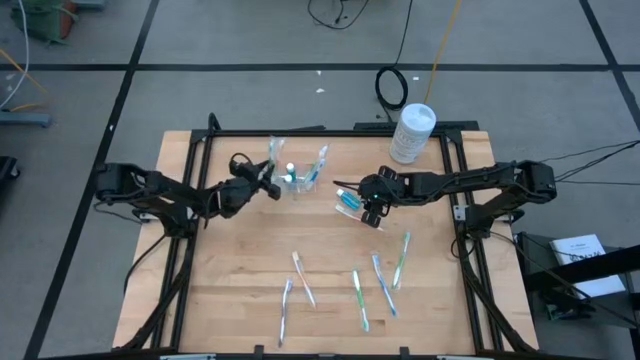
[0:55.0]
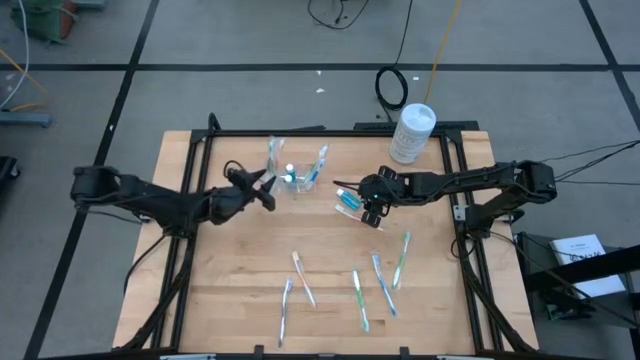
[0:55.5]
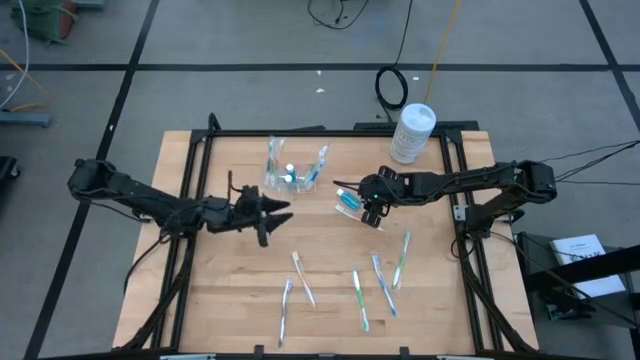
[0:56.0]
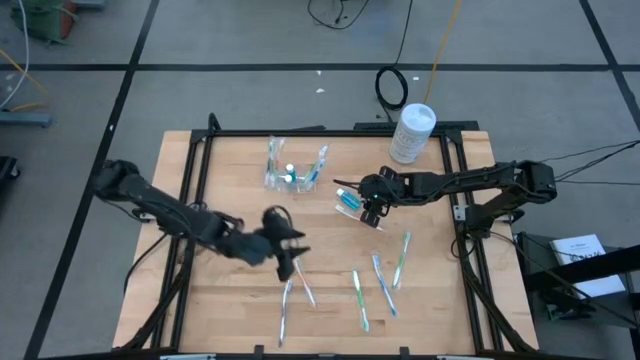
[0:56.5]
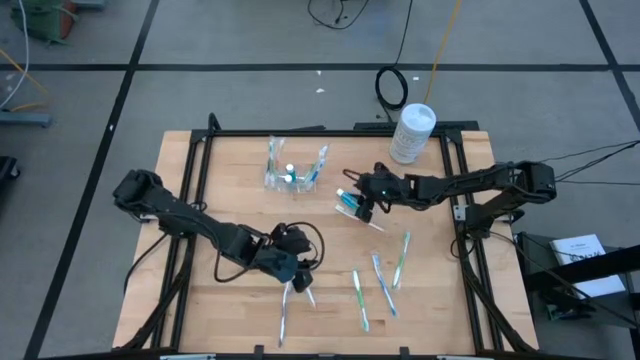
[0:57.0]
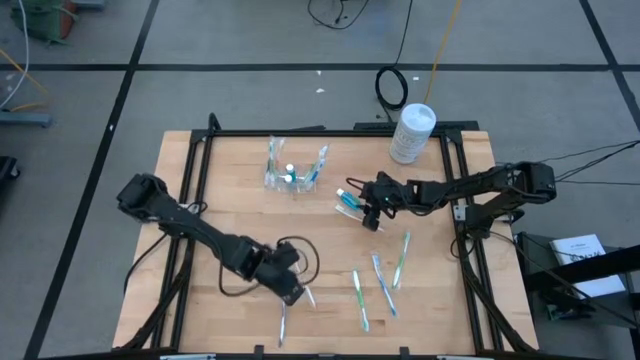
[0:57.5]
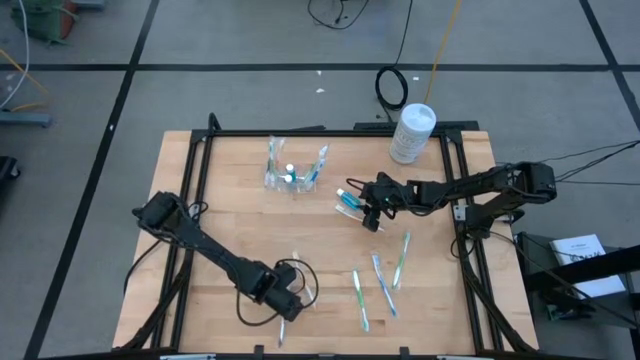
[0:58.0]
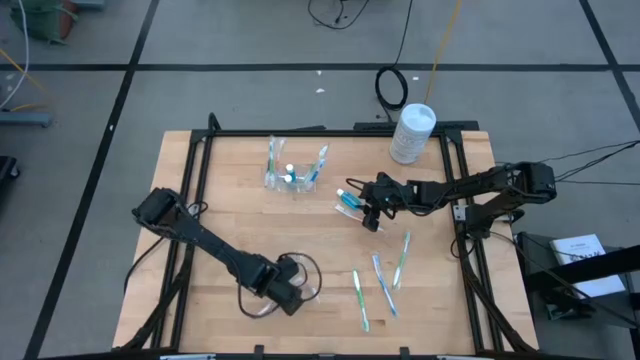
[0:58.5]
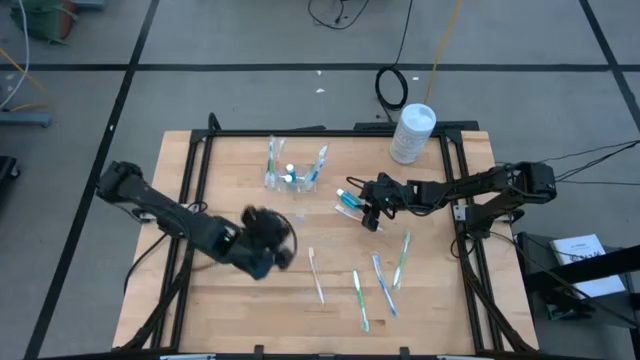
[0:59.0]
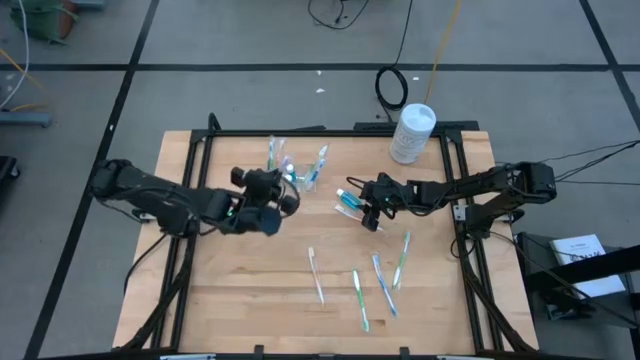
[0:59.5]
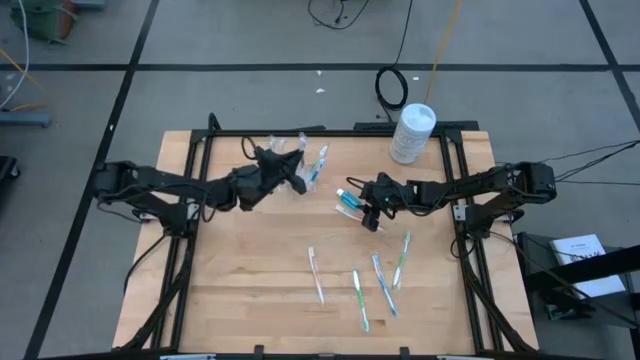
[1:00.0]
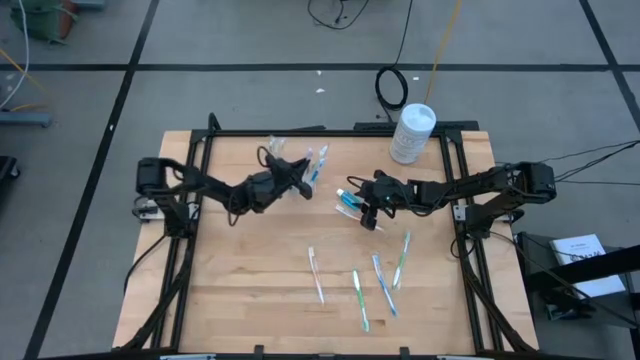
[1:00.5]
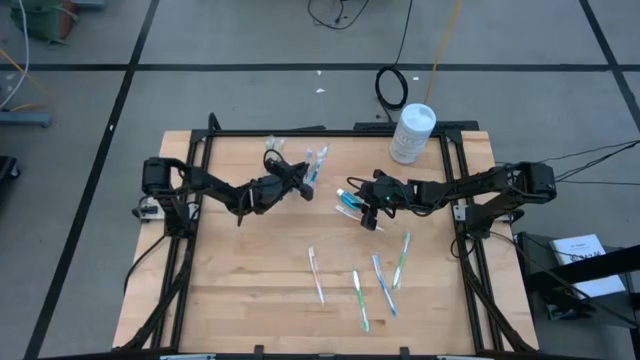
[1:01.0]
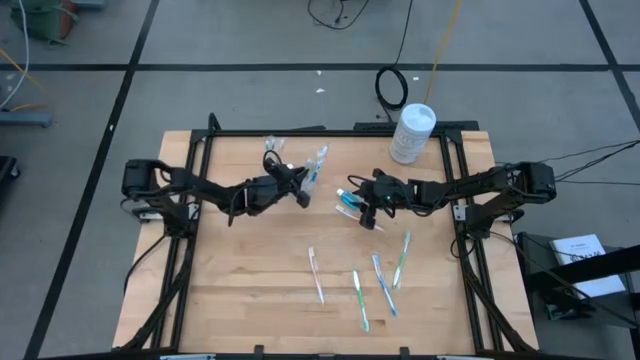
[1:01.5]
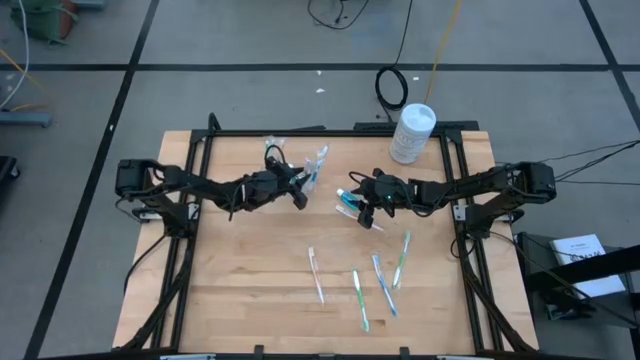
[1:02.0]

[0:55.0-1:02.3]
Task: Pick & Place toothbrushing station
Put the purple toothbrush into the transparent organizer

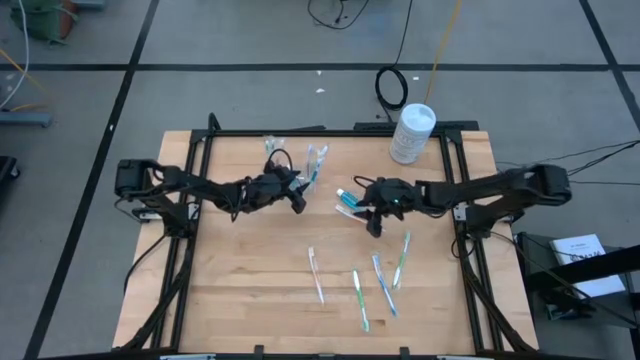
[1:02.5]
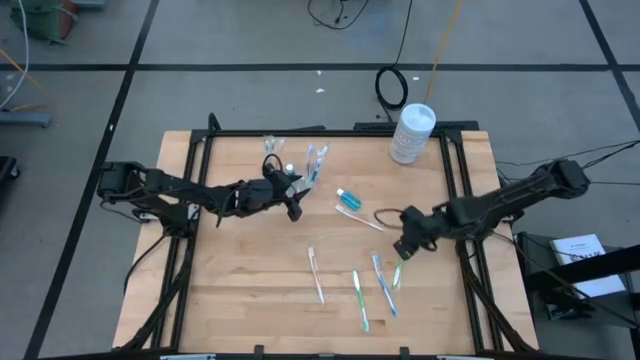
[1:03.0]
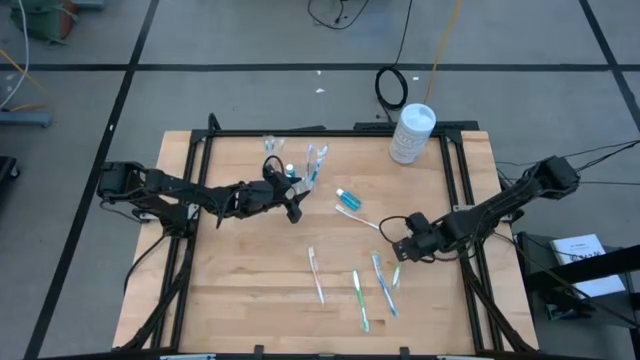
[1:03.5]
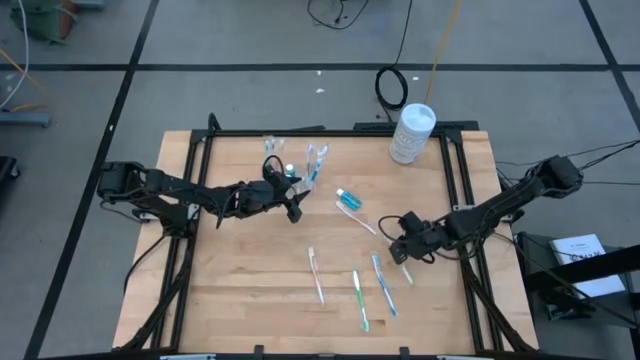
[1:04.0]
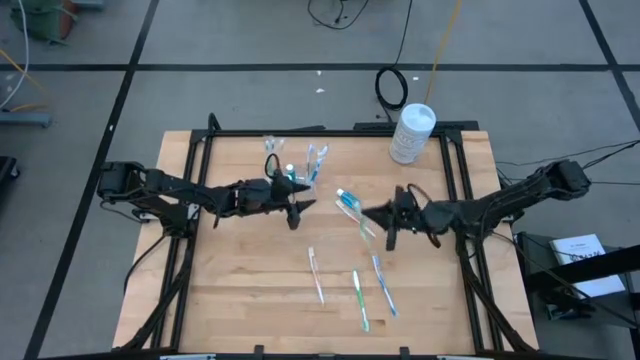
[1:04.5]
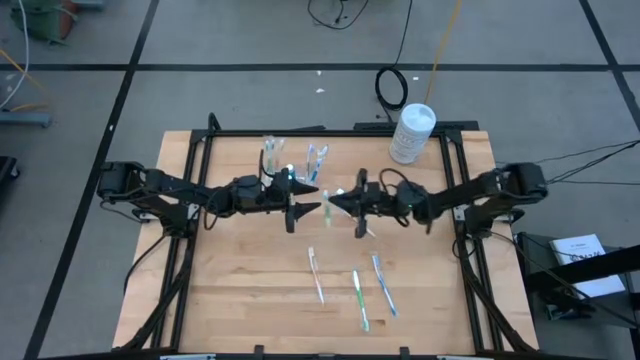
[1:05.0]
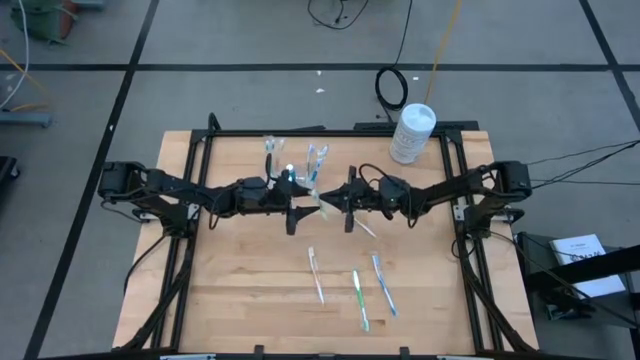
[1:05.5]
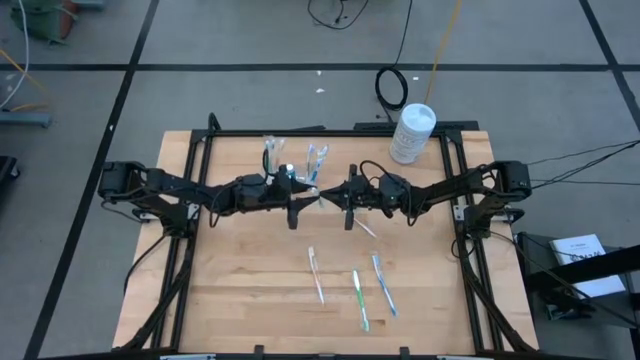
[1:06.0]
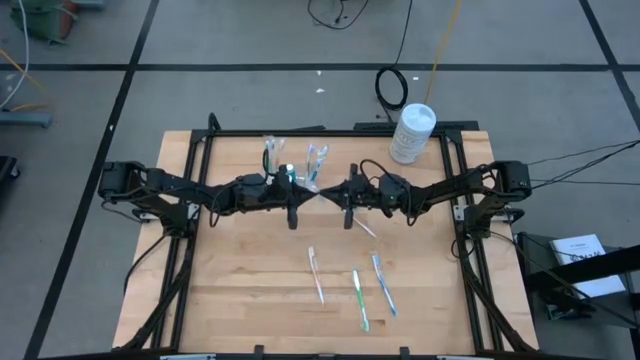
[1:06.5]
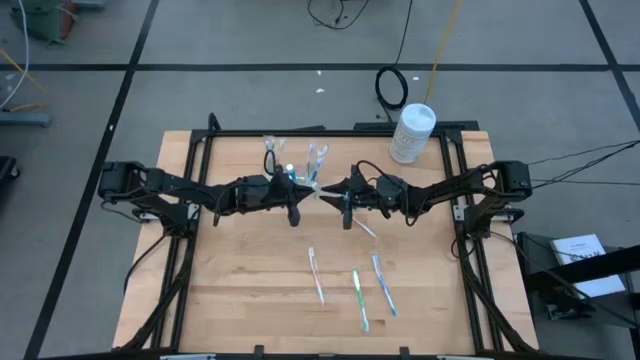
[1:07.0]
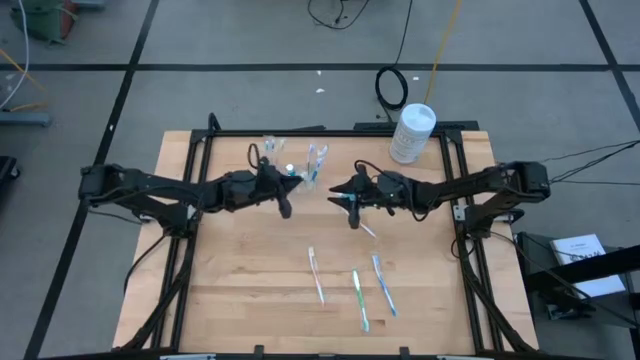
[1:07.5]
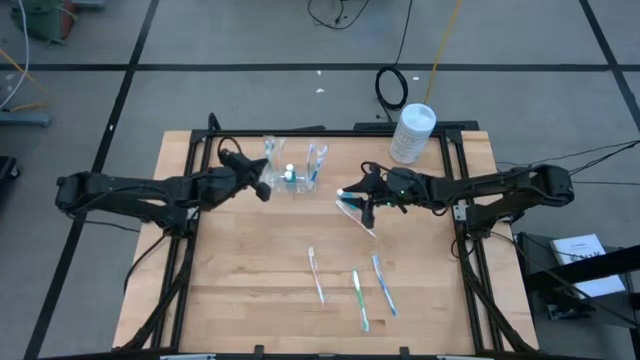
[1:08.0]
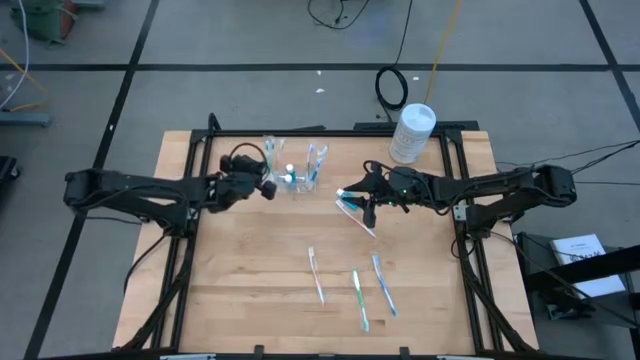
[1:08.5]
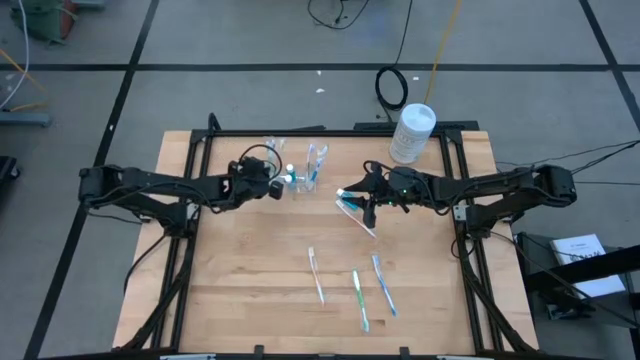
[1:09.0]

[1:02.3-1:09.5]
Put the green toothbrush into the transparent organizer

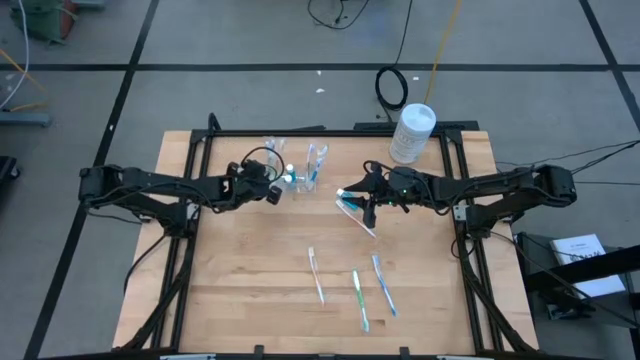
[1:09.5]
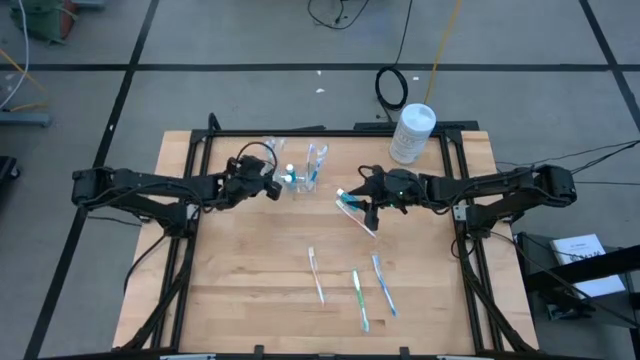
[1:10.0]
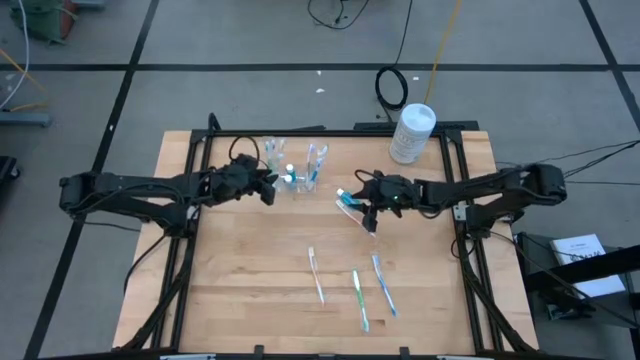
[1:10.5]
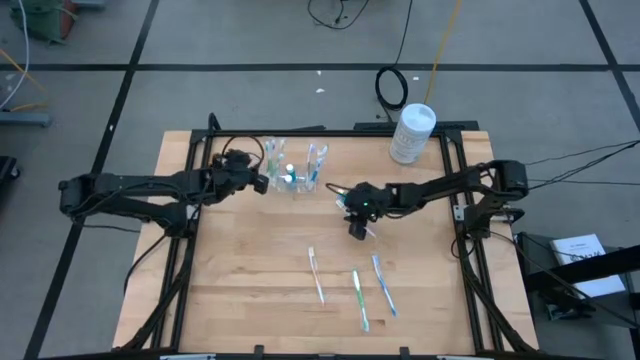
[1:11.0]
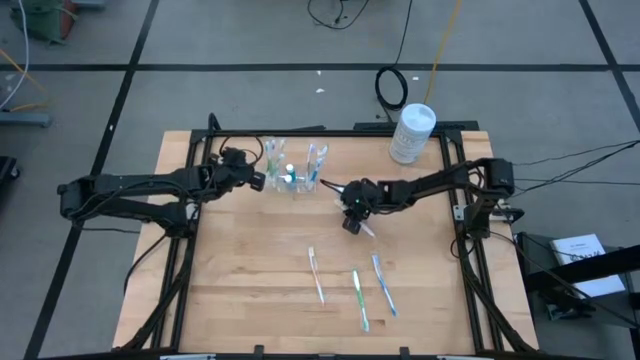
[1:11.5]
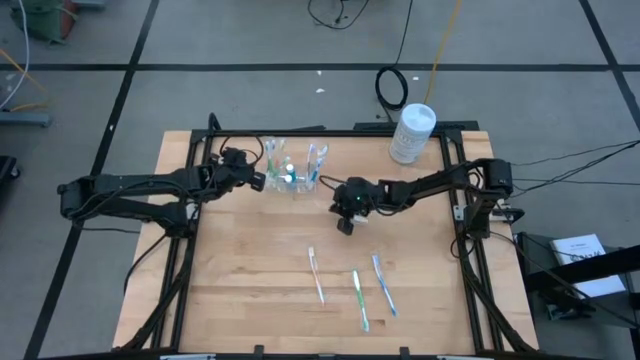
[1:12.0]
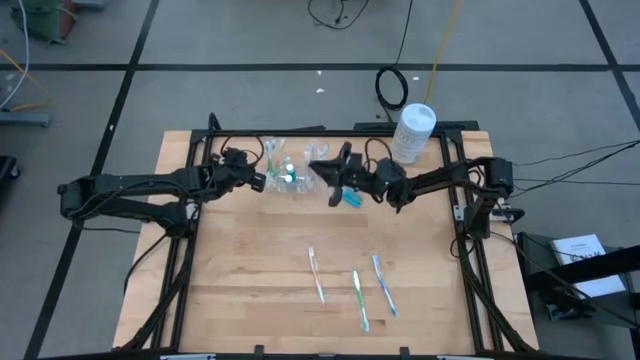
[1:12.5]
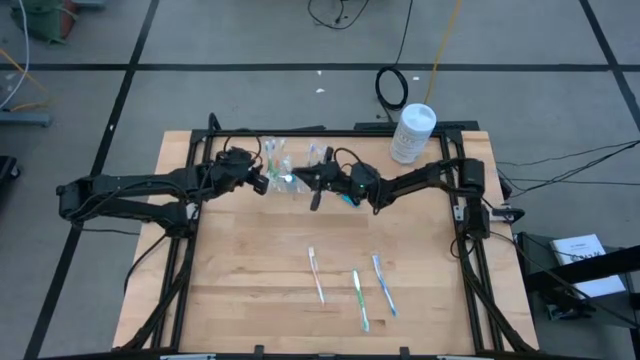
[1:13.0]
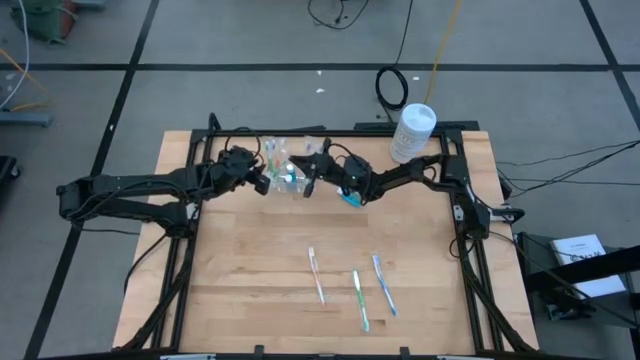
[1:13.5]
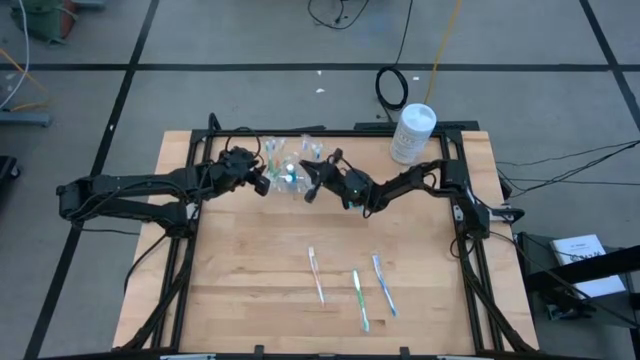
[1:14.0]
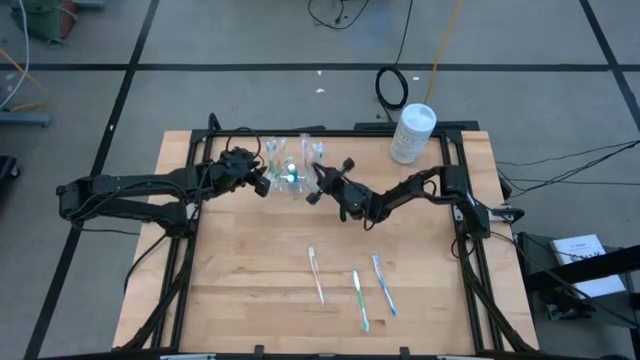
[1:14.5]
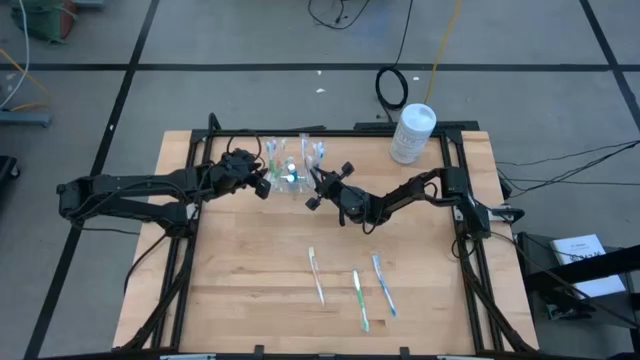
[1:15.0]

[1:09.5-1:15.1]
Put the orange toothbrush into the transparent organizer

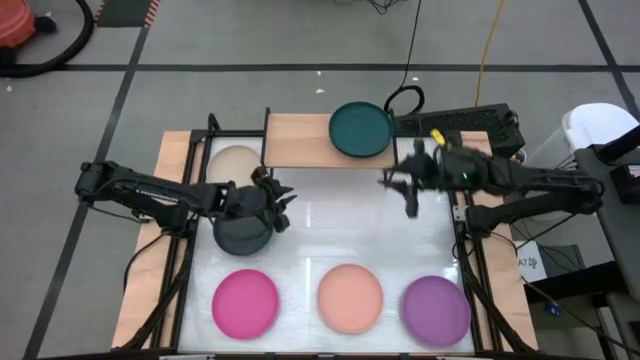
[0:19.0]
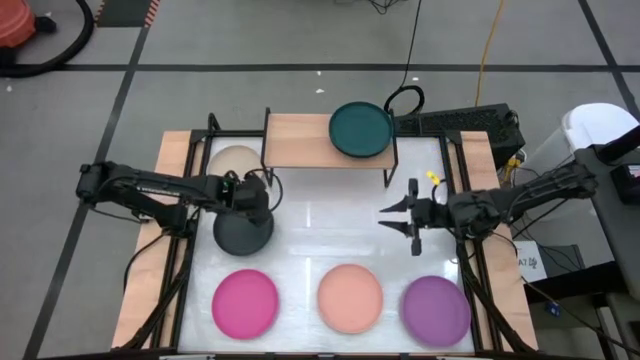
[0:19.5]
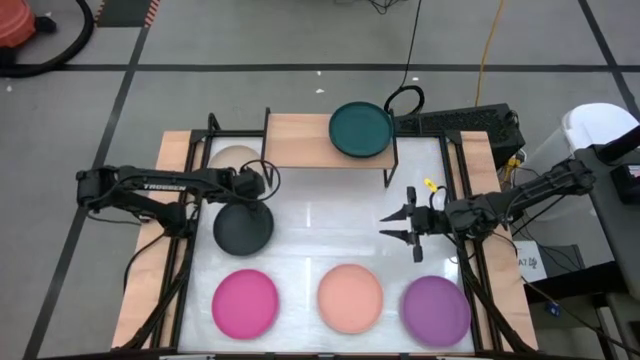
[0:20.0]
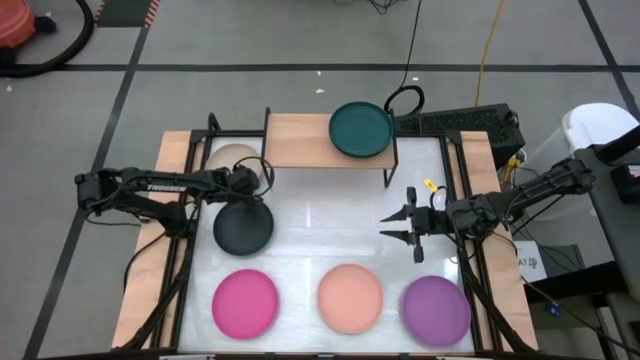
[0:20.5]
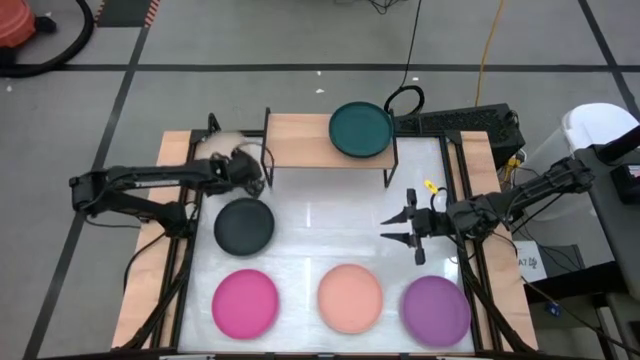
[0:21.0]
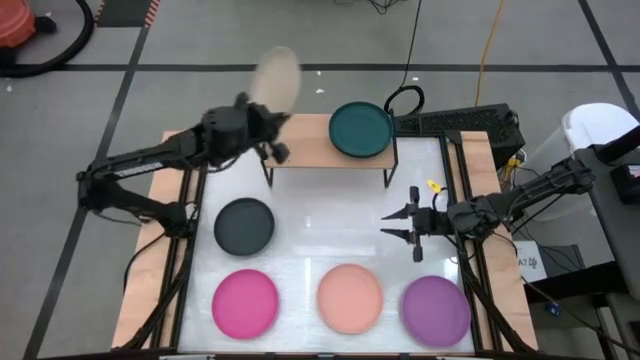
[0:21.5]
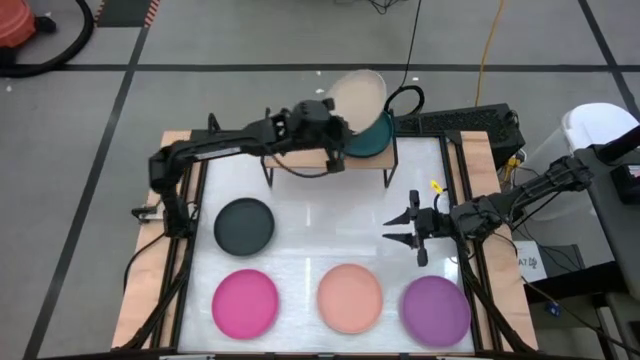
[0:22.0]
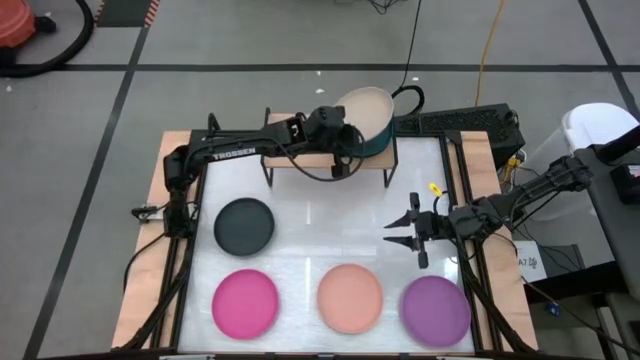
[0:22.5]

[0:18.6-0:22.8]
Task: Place and stack plates onto a shelf
Put the brown plate on the dark green plate on the shelf
